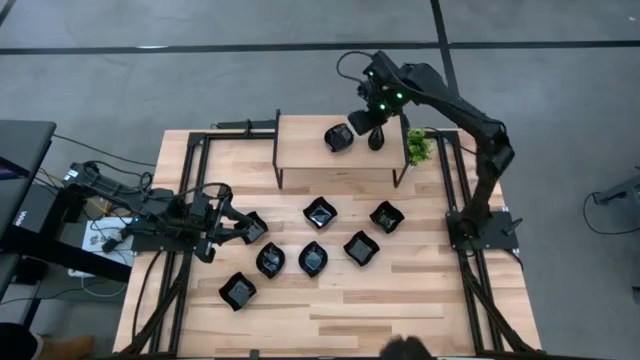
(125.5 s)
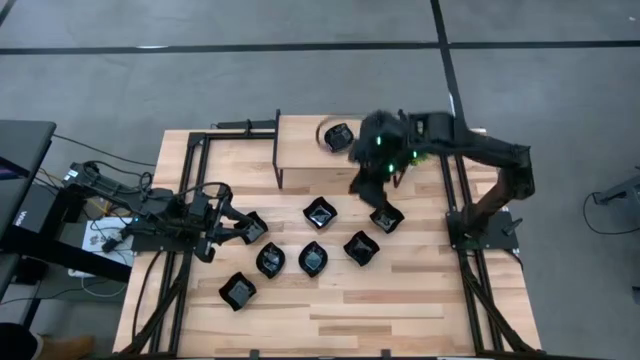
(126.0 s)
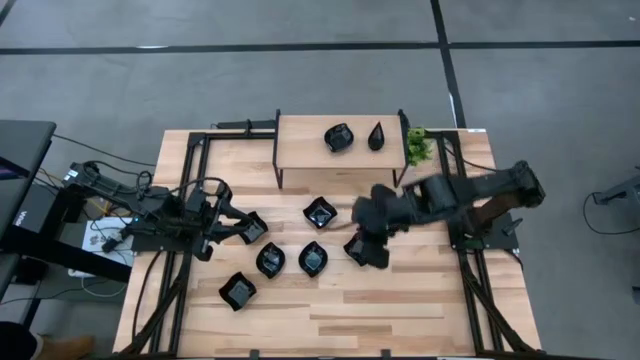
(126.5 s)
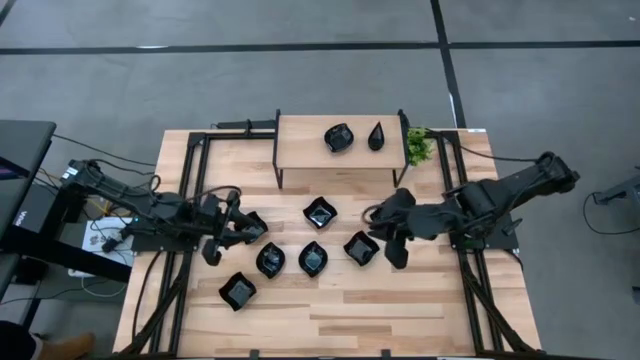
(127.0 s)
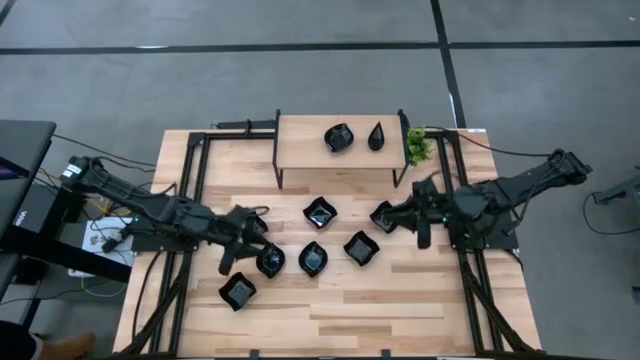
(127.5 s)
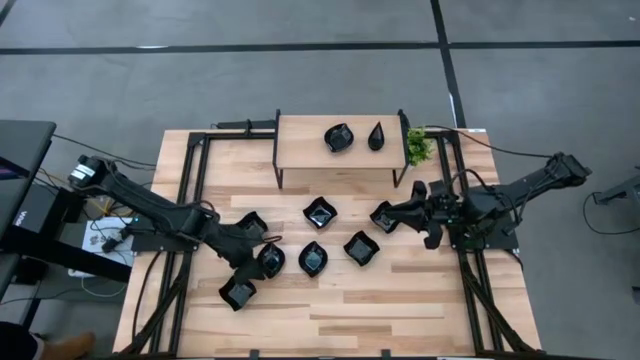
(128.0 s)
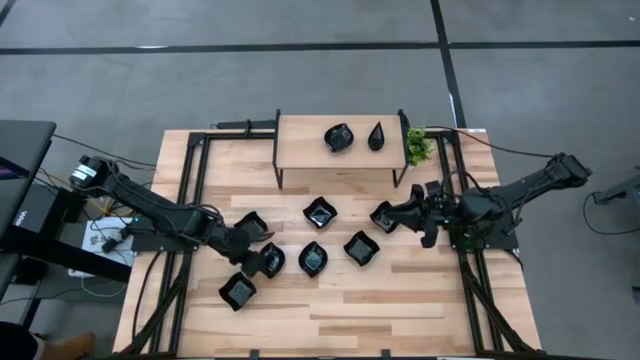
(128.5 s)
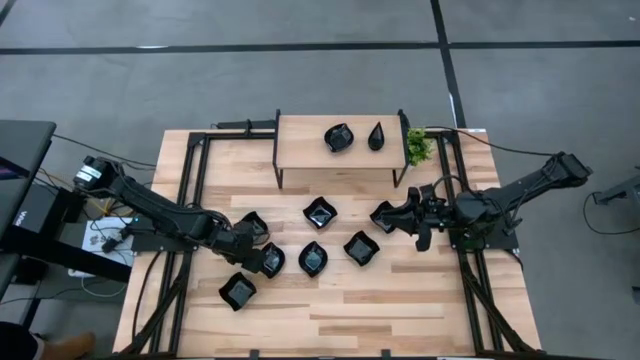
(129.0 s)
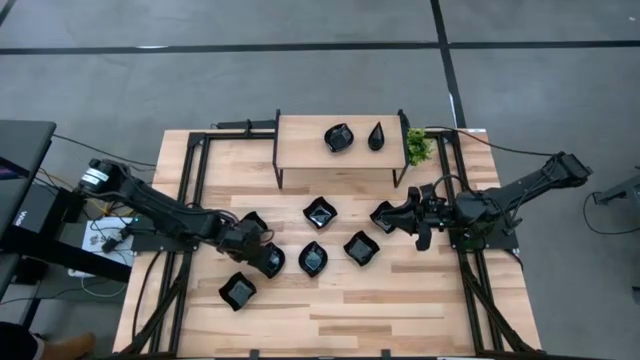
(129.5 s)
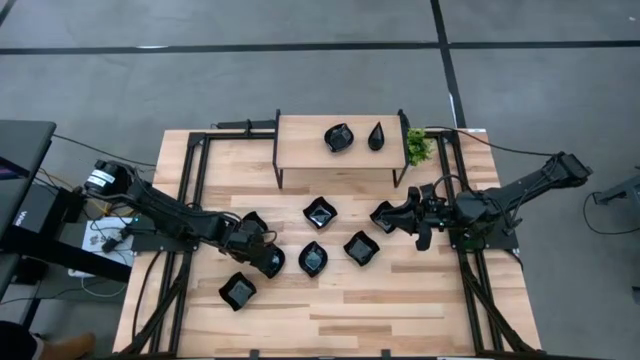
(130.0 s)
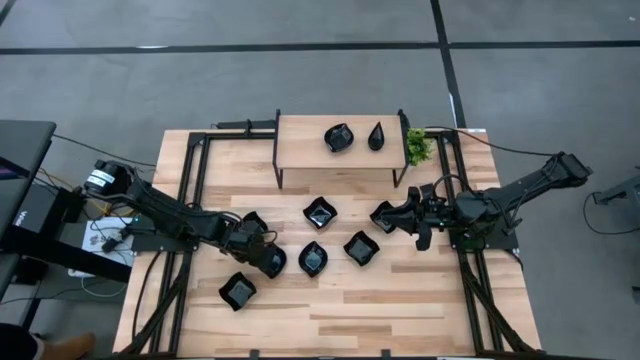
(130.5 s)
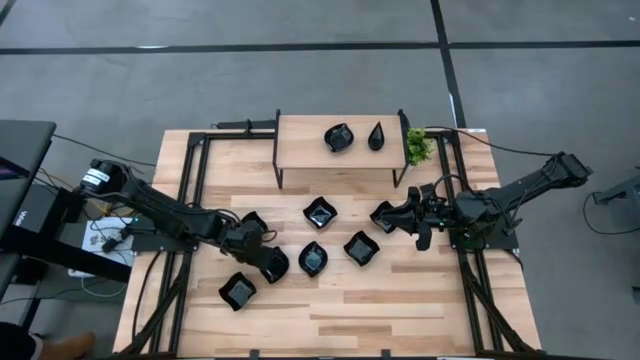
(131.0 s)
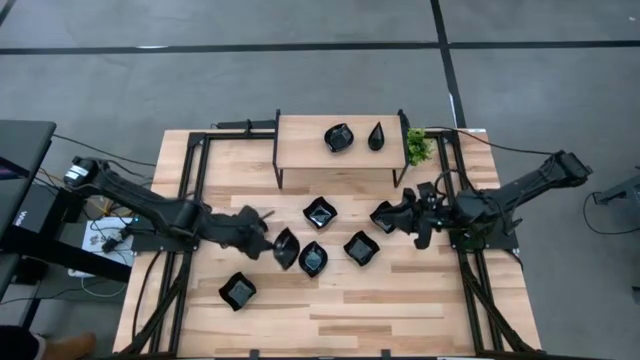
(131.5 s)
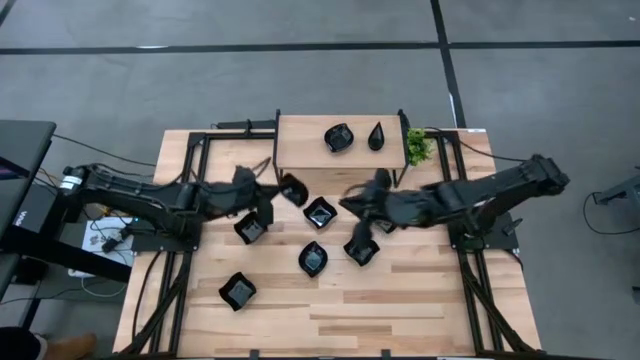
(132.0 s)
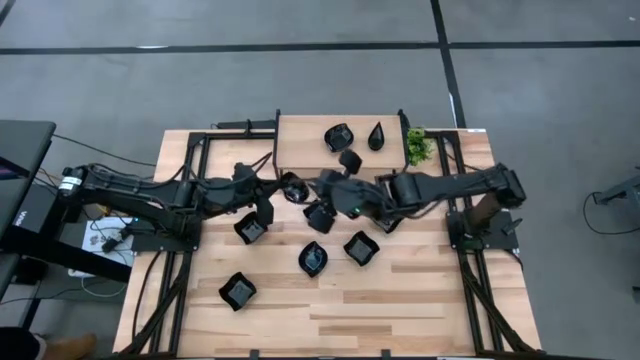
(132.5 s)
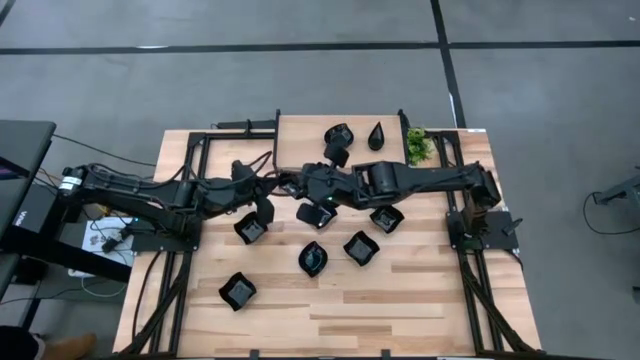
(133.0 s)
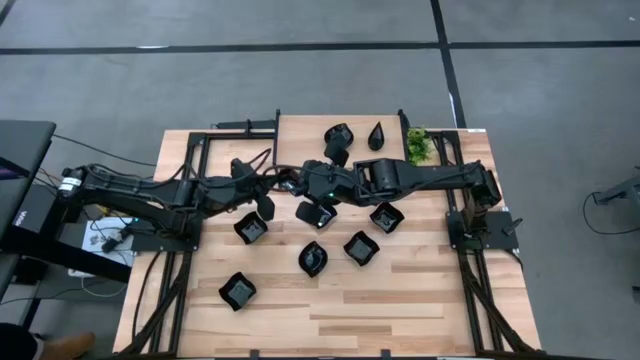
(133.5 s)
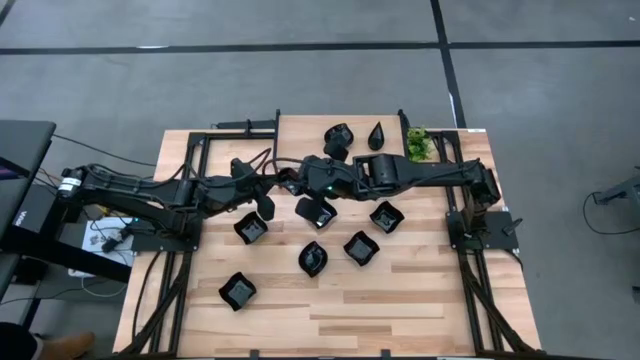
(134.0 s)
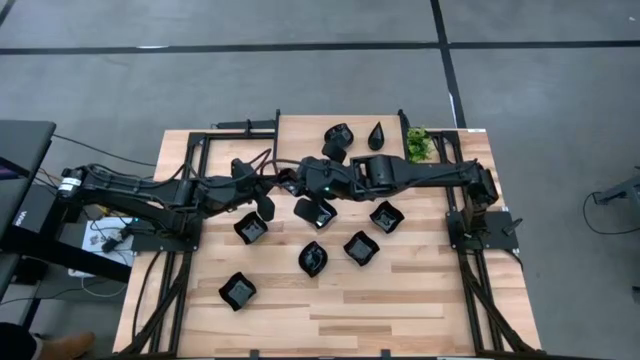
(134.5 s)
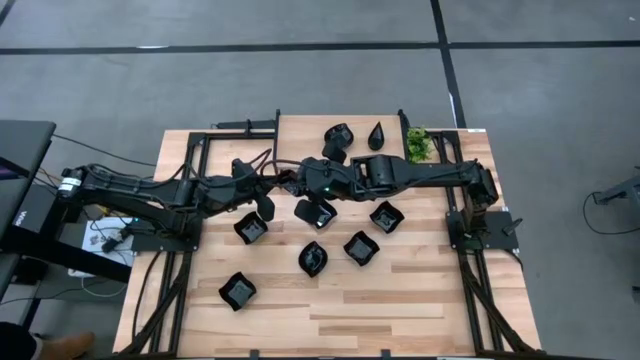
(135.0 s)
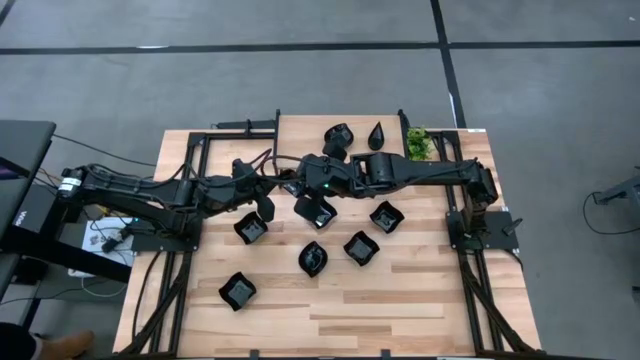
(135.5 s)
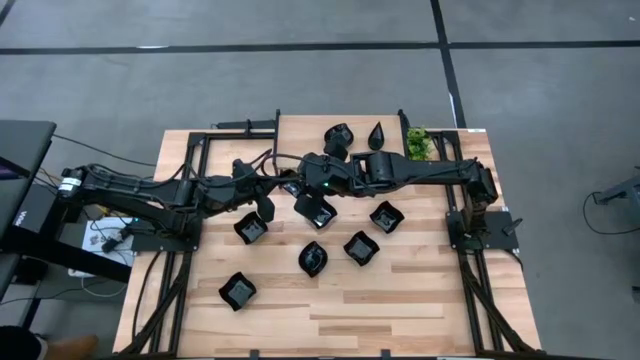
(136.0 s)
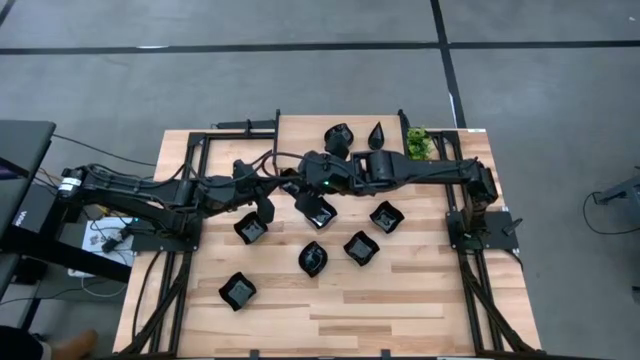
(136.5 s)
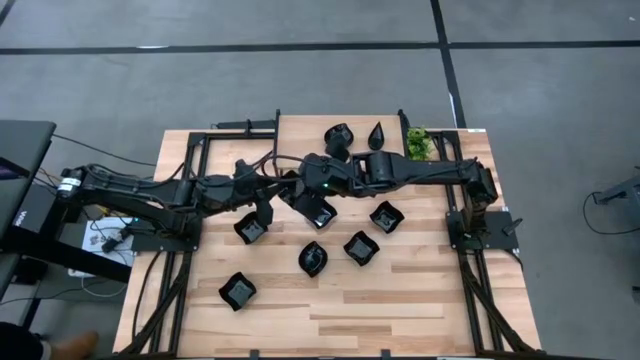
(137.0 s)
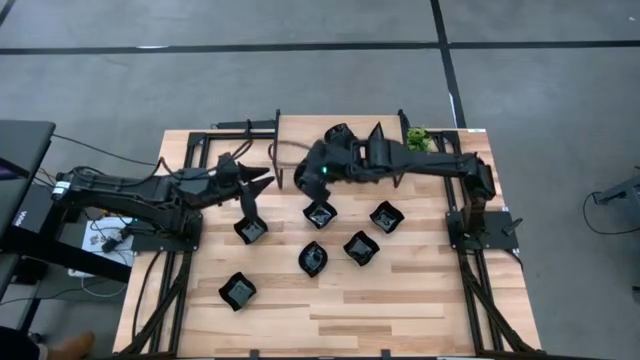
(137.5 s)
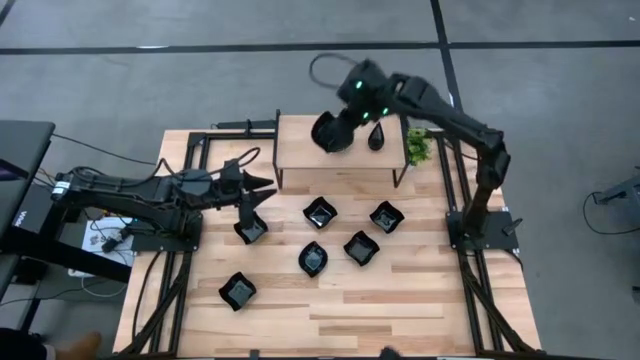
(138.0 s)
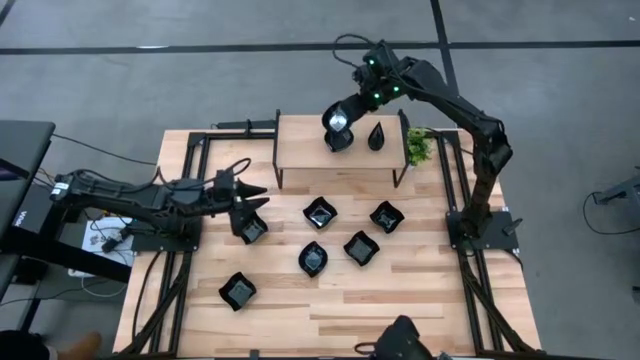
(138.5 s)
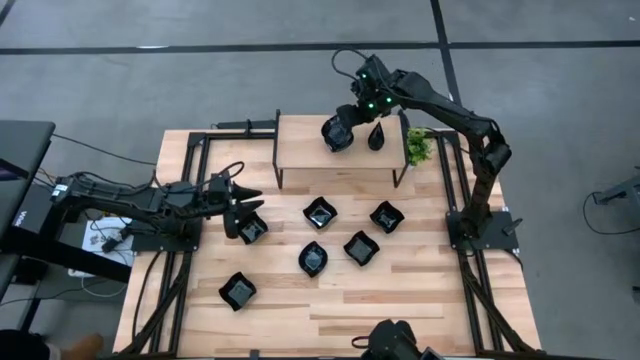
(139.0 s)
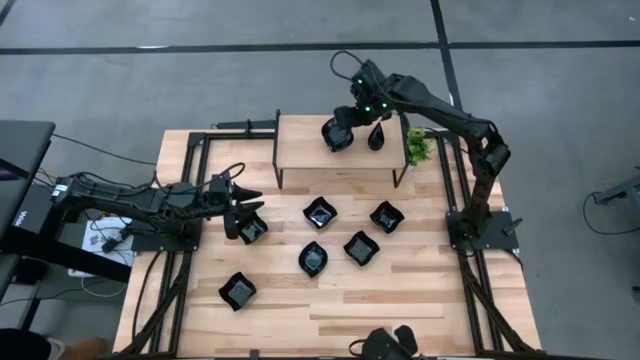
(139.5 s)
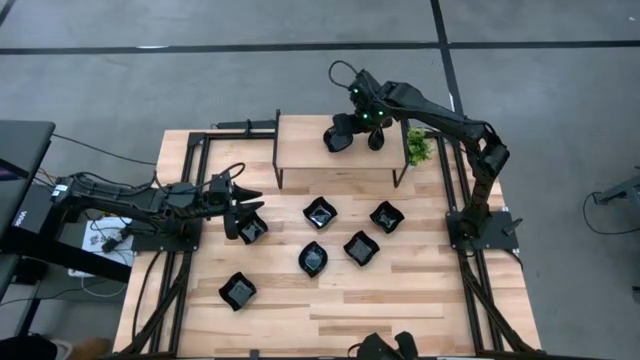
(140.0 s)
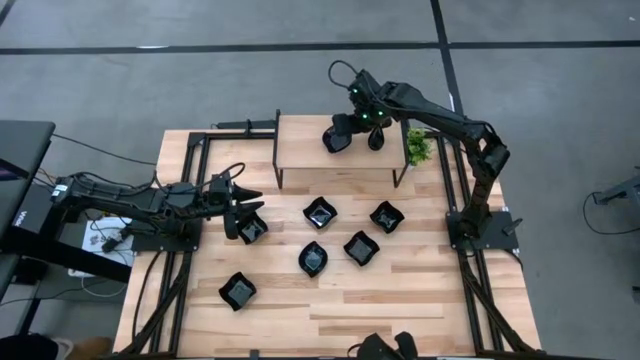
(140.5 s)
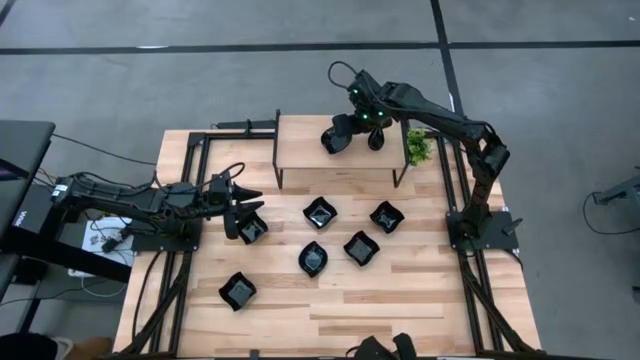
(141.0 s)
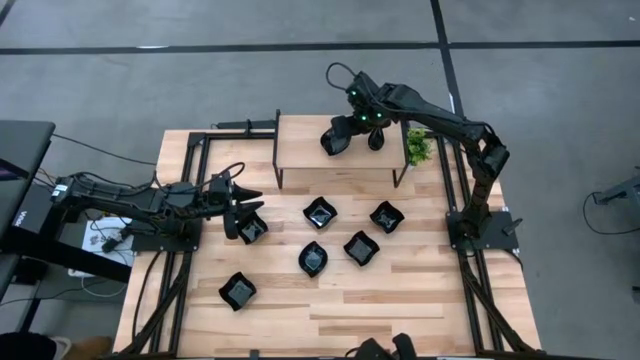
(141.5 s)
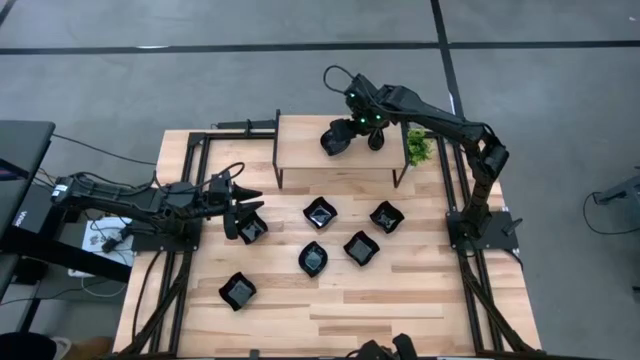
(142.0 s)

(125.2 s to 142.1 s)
Task: Pick & Place Mini shaped plates
Stack the leaf-shaped plate on top of the other leaf-shaped plates on the shelf

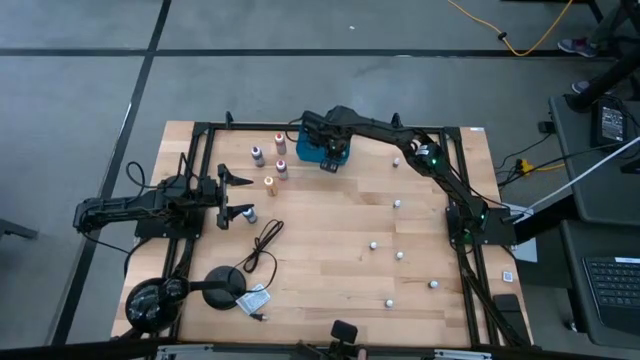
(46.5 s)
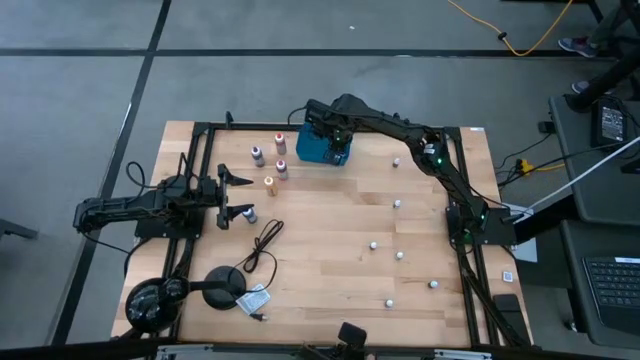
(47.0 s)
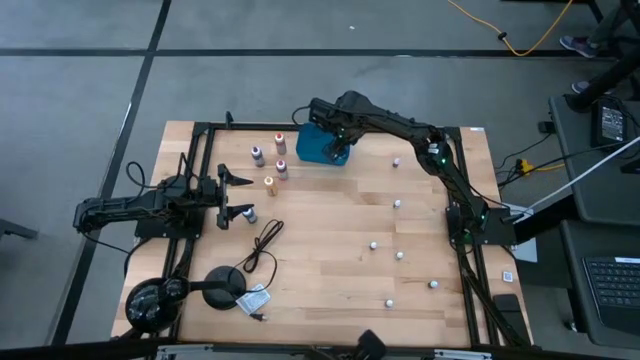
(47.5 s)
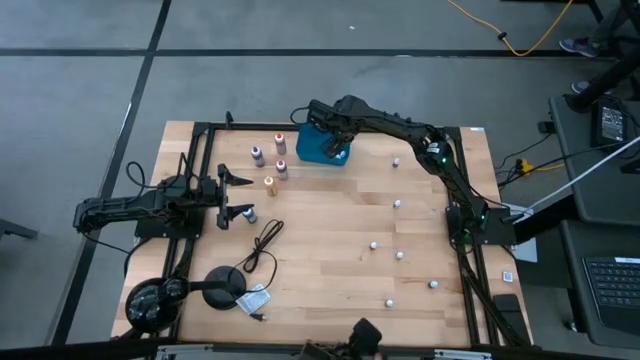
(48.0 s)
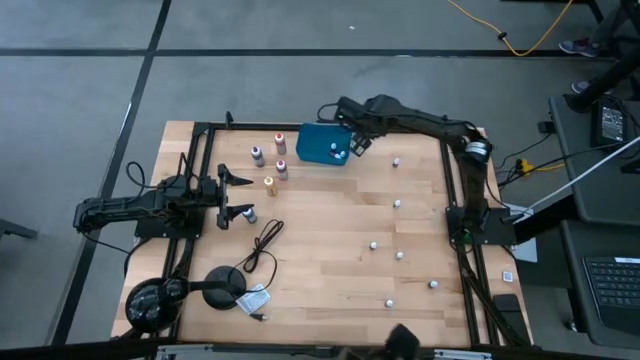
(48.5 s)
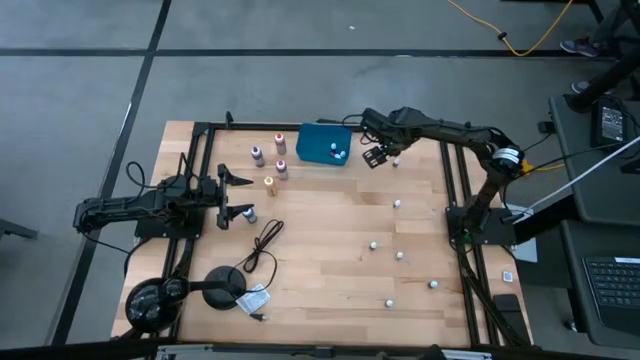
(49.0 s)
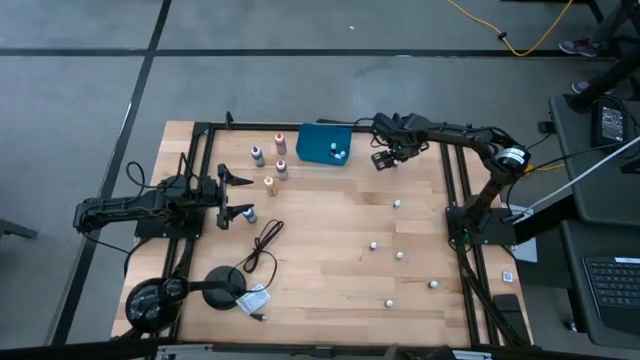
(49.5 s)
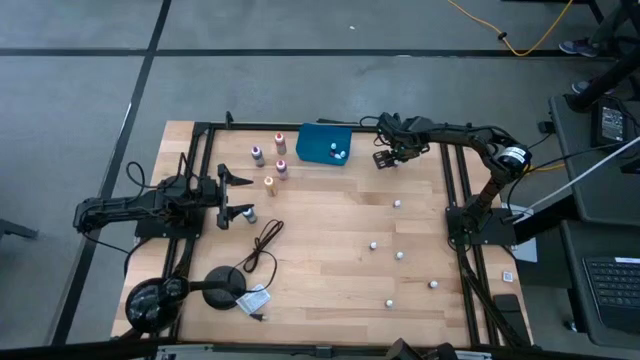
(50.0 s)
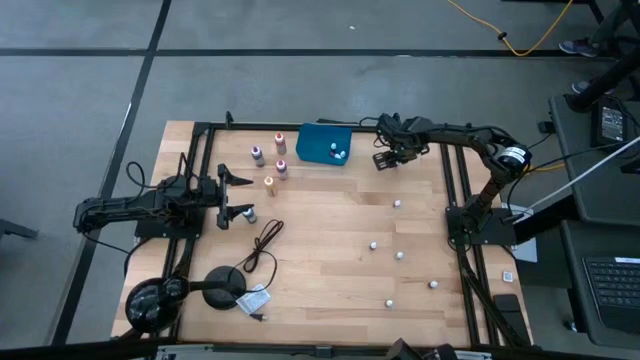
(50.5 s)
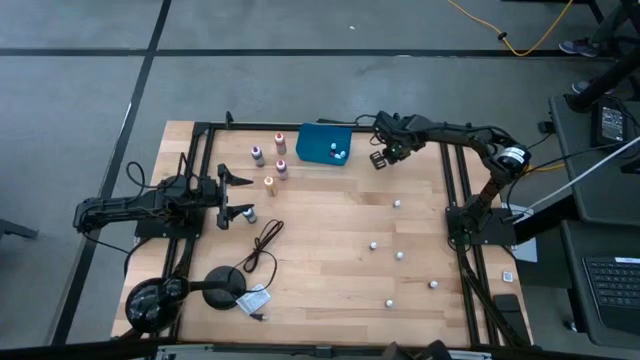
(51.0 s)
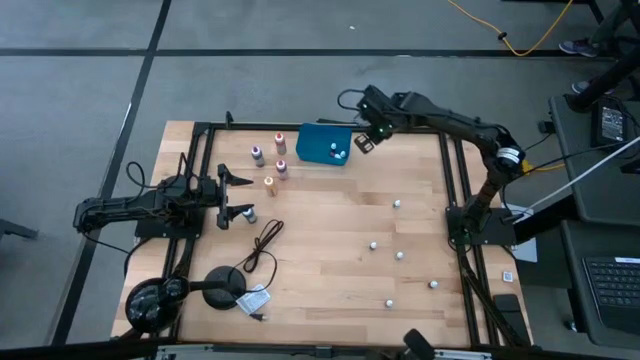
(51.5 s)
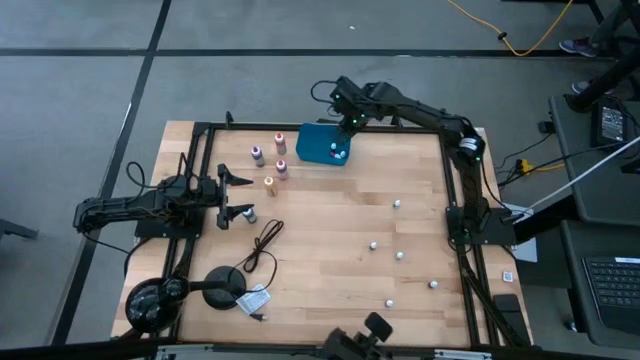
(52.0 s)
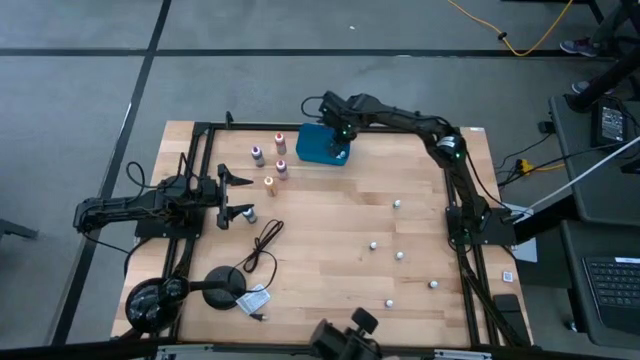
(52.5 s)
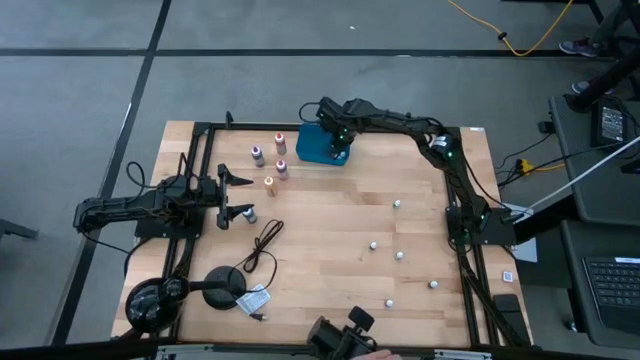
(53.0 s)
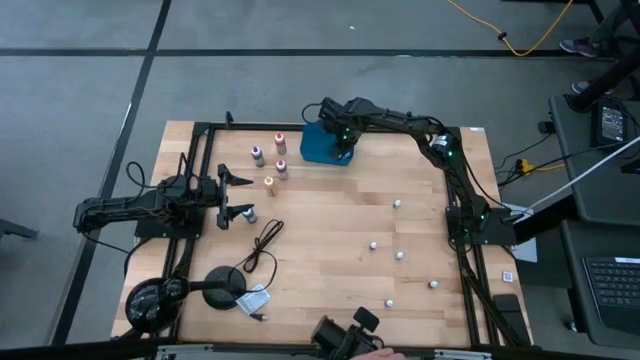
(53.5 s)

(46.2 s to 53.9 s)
Task: Pick & Place food coloring
Put the small red food coloring bottle into the blue container
